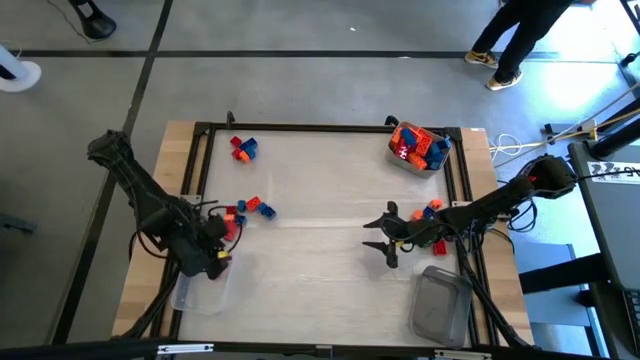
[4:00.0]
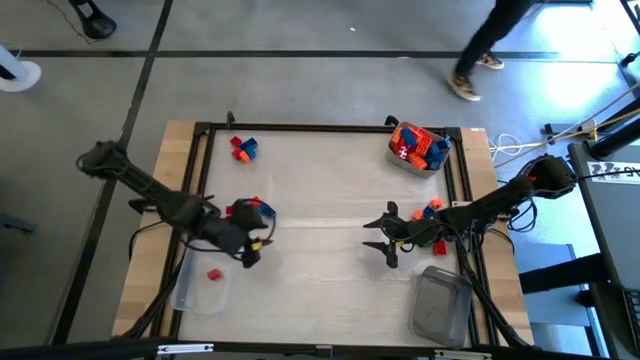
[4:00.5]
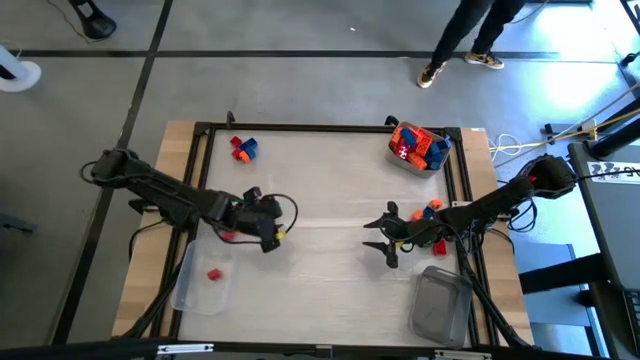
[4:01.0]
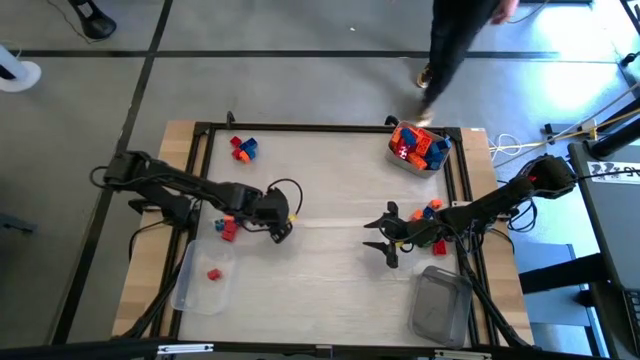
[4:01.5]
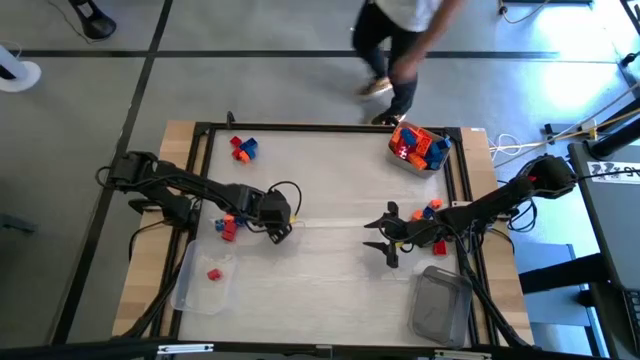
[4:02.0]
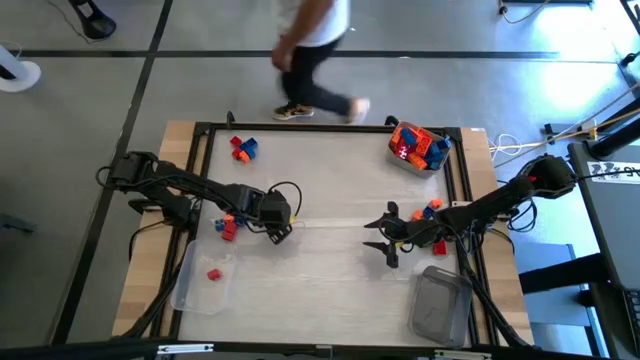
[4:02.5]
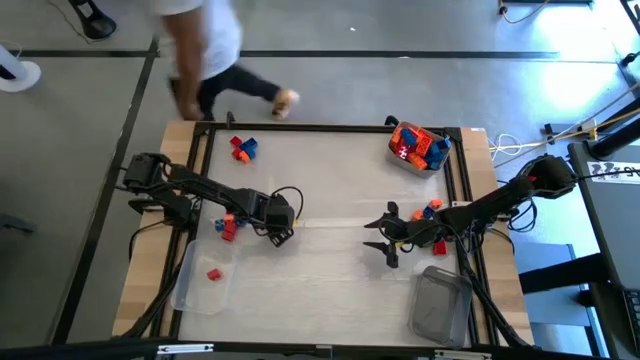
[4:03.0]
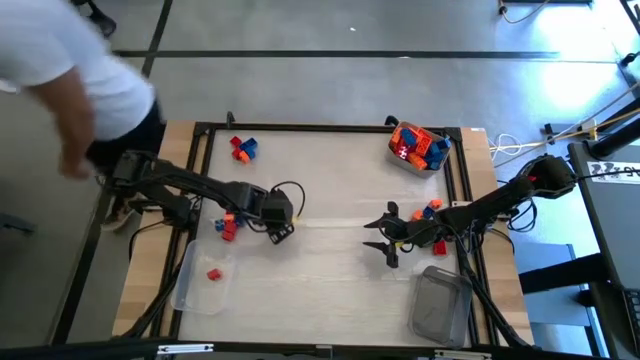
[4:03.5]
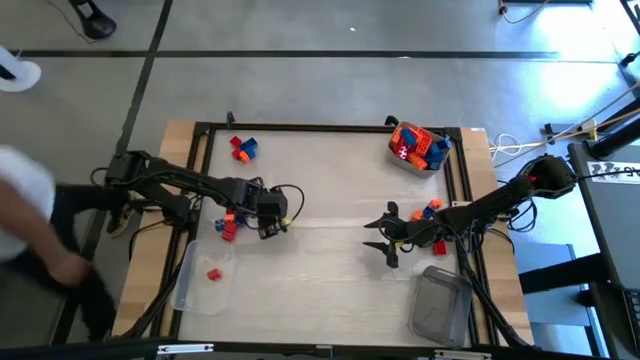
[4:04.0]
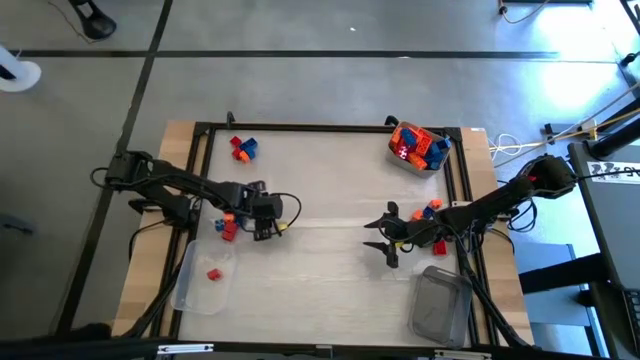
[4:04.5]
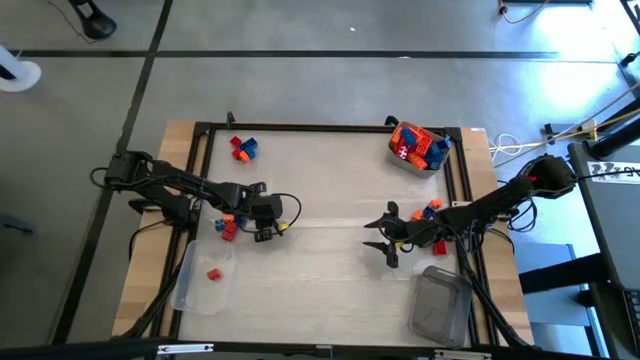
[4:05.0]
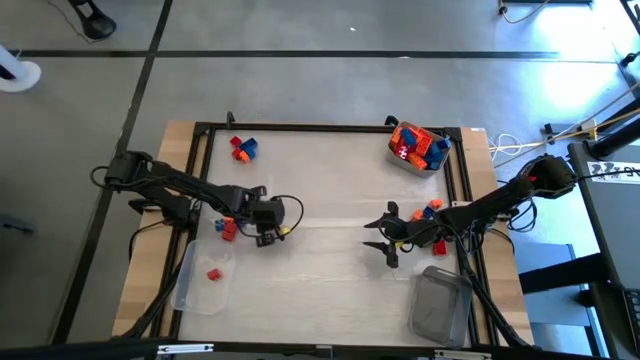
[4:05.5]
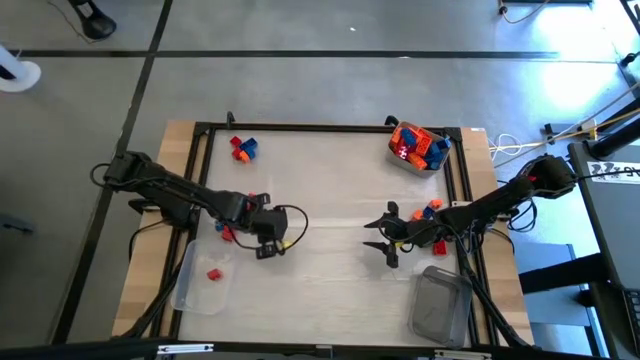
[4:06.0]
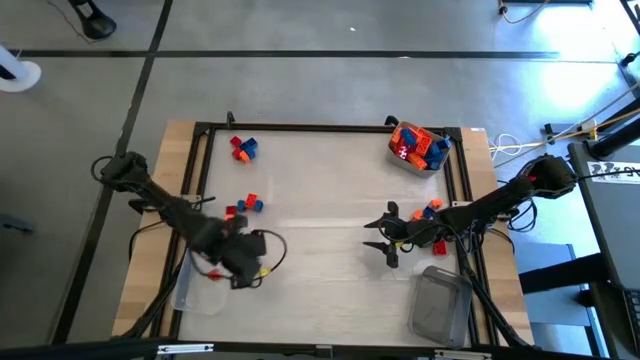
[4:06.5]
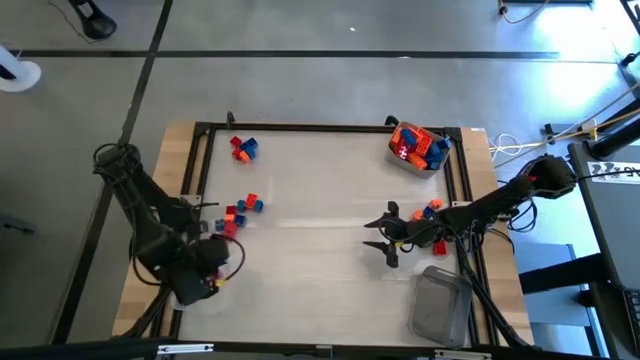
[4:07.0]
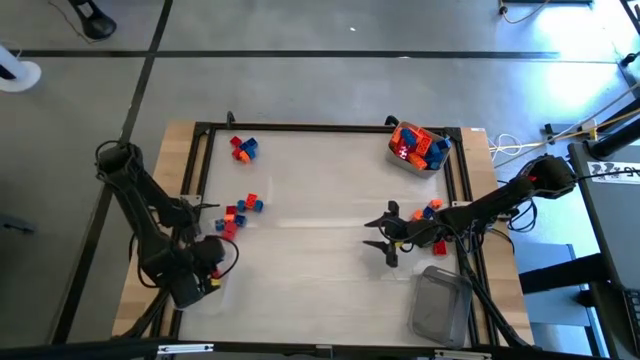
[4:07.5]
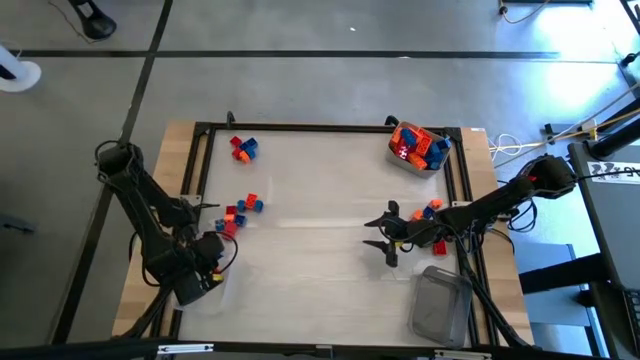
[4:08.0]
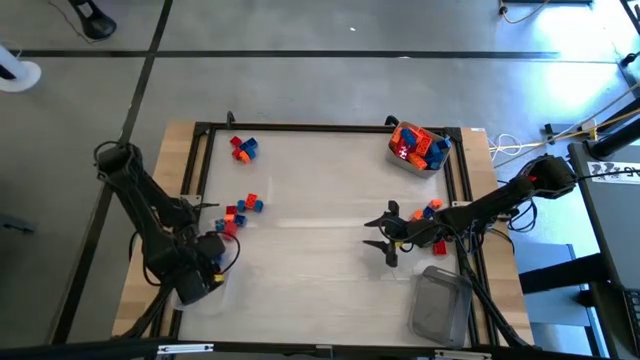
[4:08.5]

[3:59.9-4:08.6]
Task: Sort blocks by size
Put the blue game piece into the transparent bin

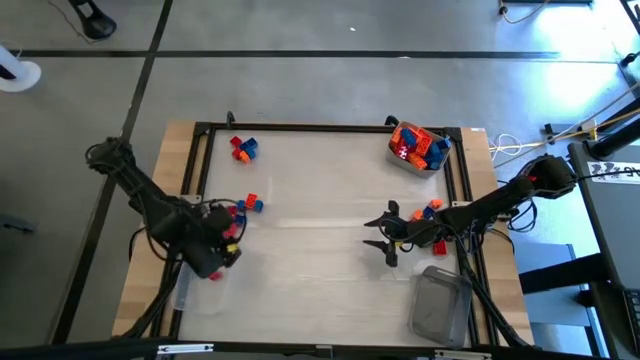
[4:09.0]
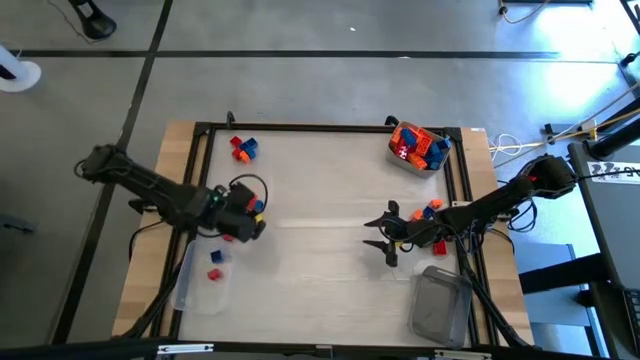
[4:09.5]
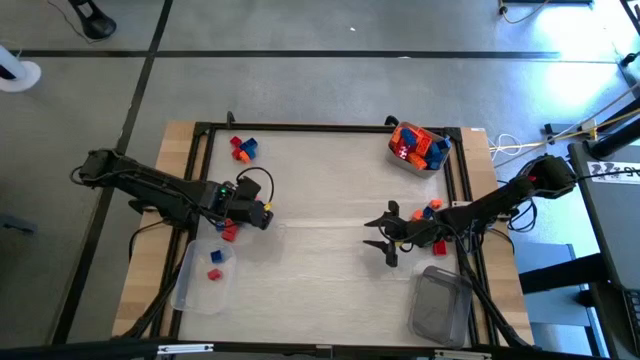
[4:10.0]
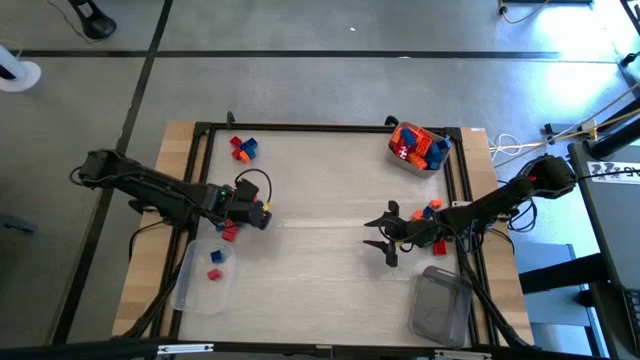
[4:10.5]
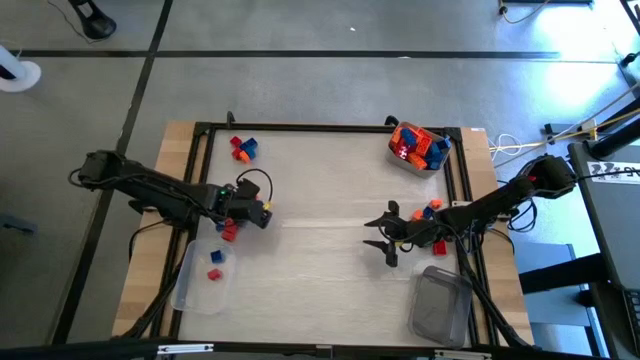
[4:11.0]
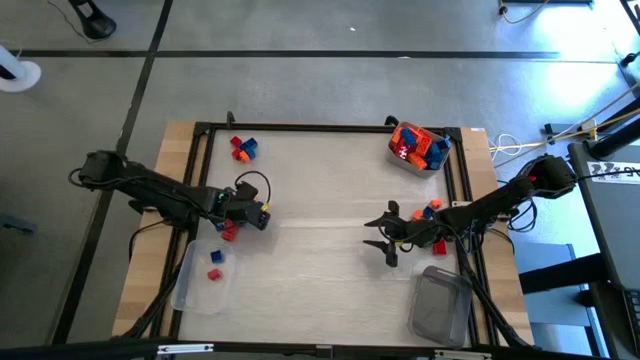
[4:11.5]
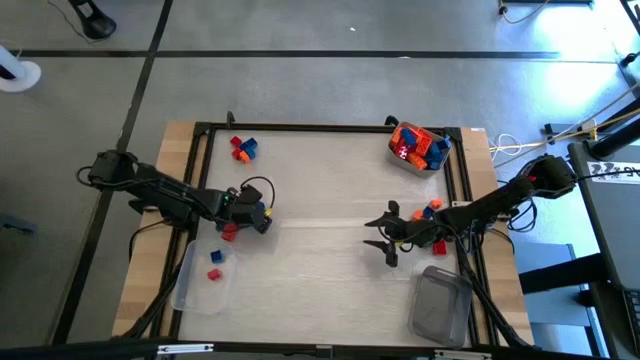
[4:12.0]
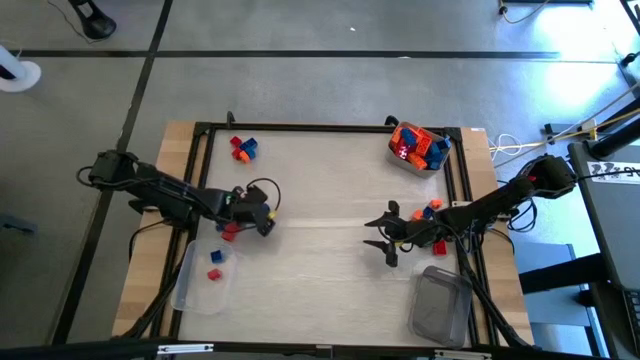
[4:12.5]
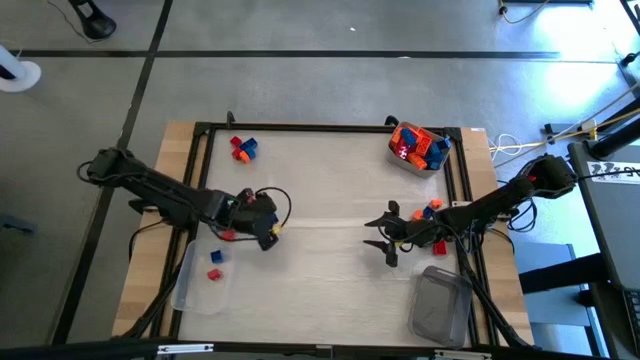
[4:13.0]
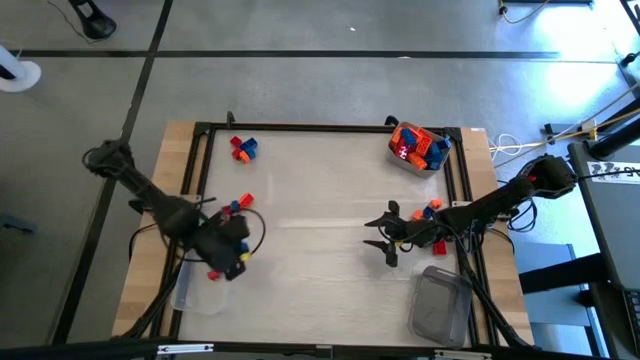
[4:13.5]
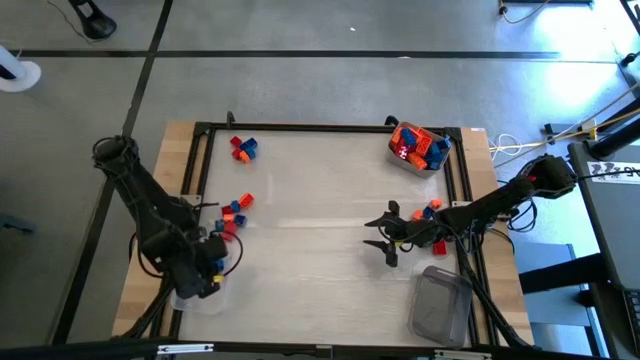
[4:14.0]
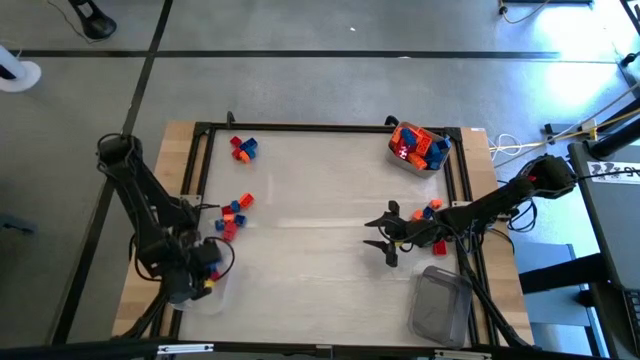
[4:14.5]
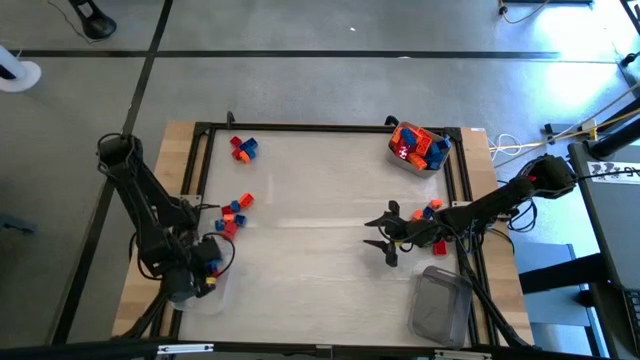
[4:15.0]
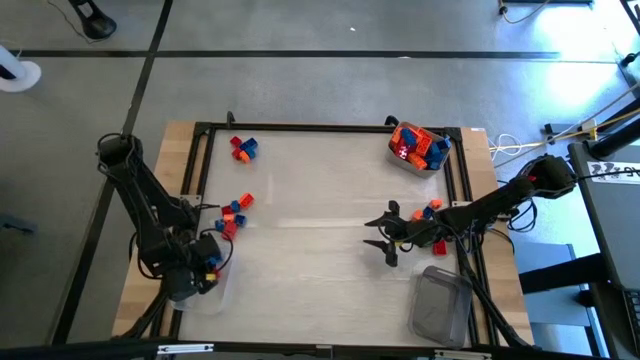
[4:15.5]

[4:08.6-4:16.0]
Put the blue game piece into the transparent bin

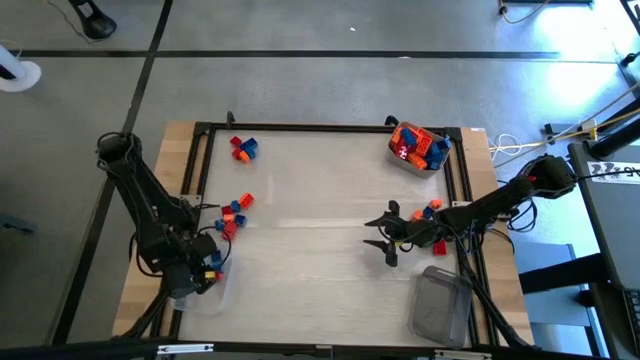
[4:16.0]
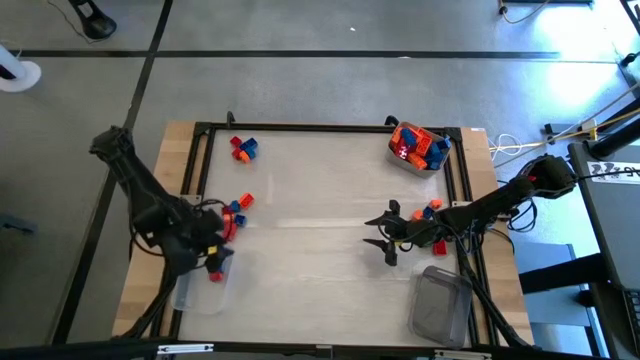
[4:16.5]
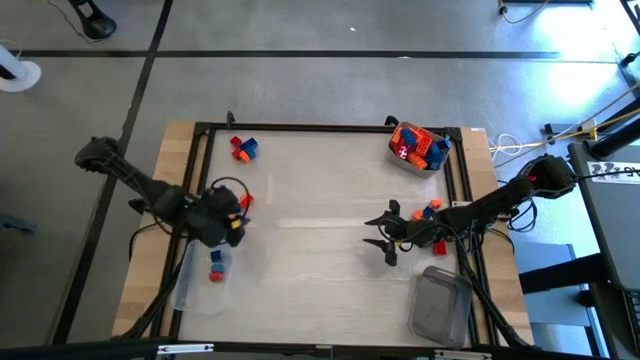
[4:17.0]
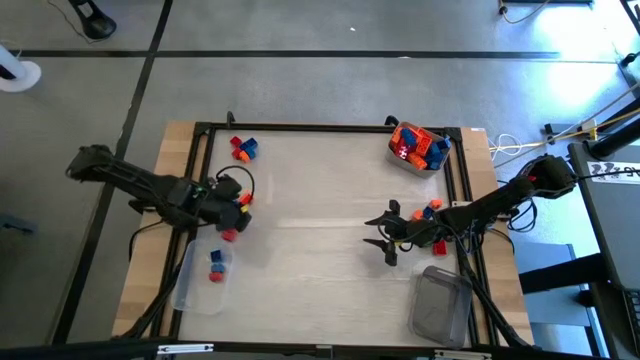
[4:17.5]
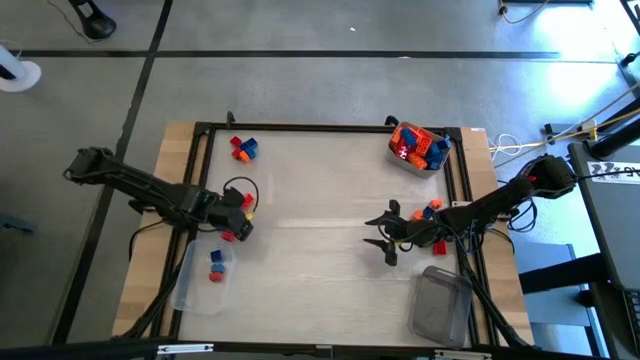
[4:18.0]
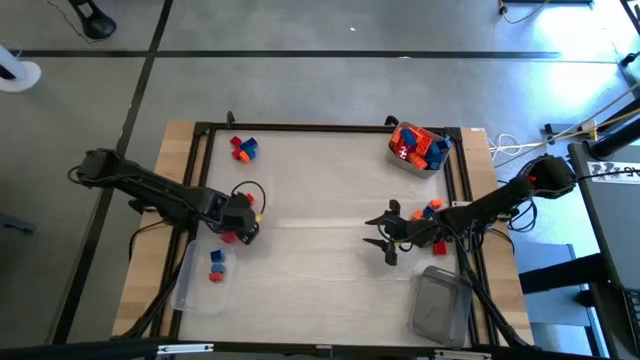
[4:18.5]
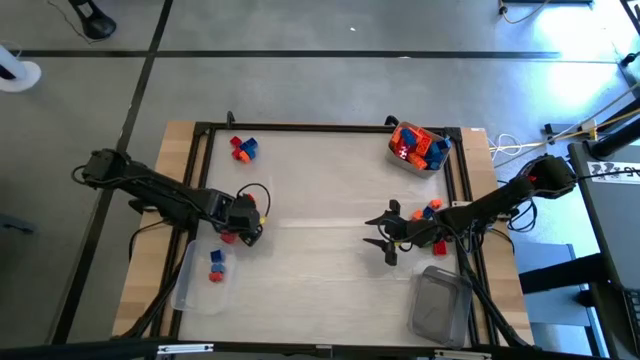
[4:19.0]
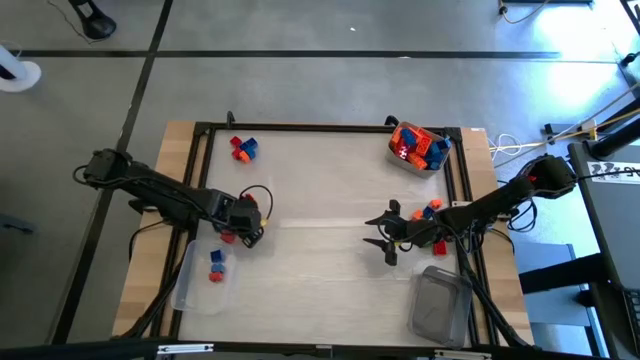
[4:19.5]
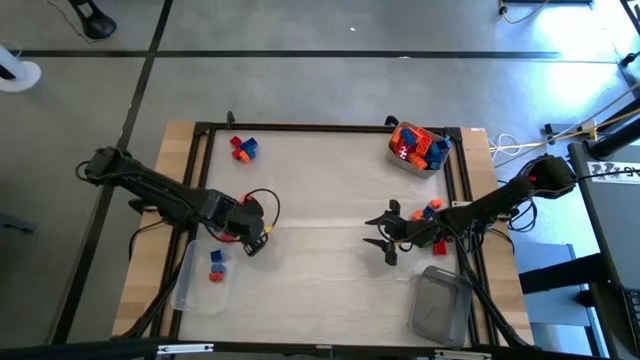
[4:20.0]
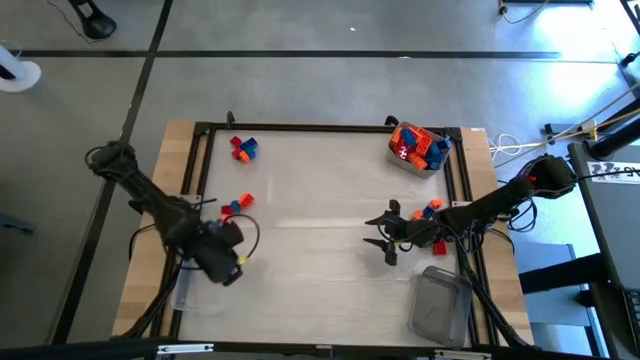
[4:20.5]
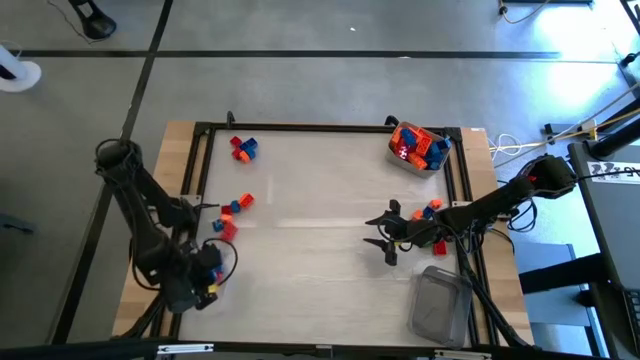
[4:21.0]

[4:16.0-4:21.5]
Put the blue game piece into the transparent bin
